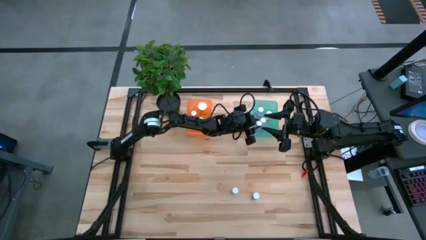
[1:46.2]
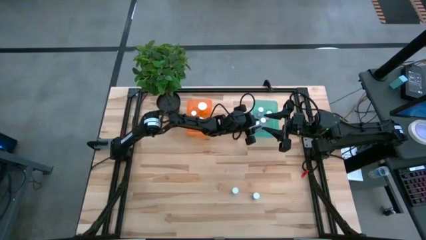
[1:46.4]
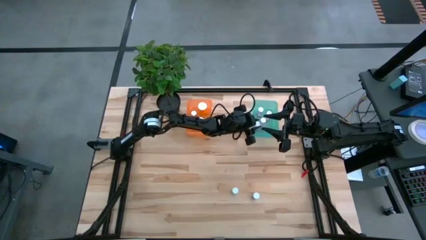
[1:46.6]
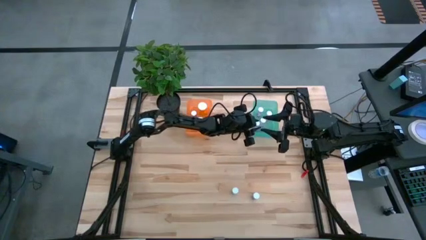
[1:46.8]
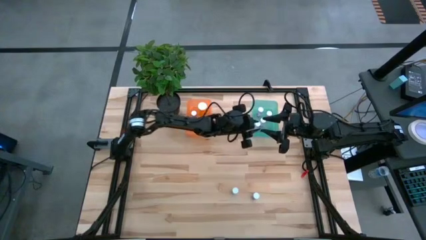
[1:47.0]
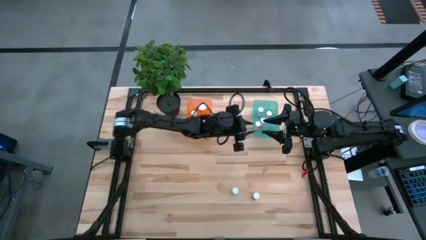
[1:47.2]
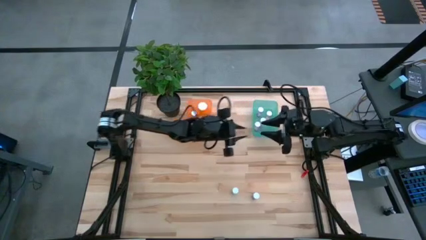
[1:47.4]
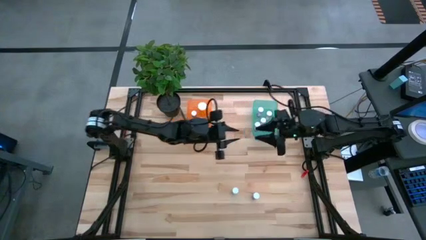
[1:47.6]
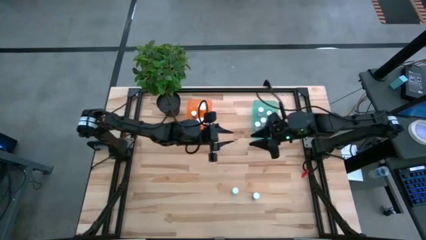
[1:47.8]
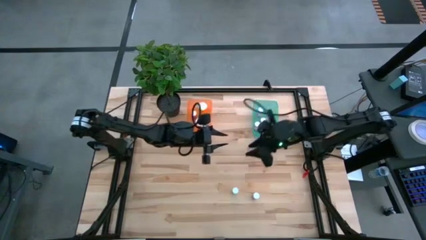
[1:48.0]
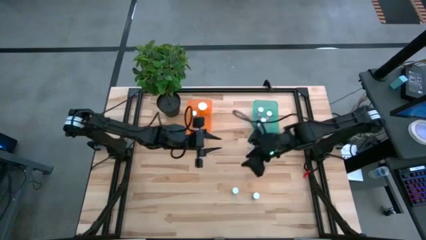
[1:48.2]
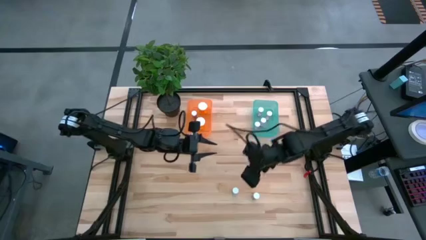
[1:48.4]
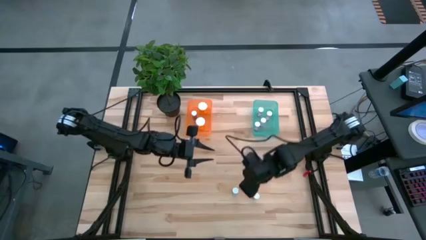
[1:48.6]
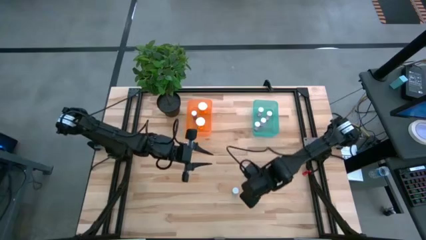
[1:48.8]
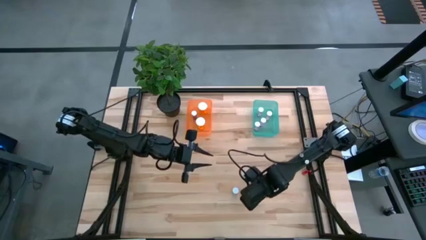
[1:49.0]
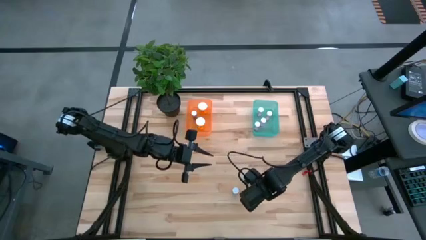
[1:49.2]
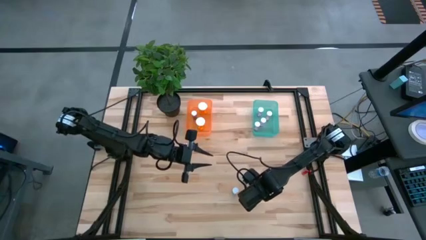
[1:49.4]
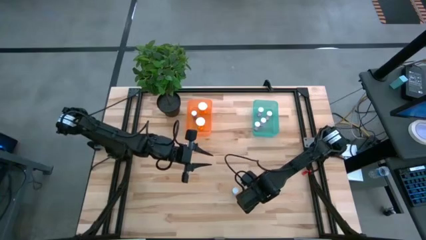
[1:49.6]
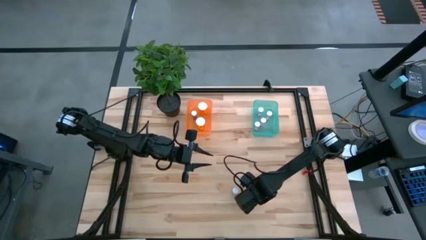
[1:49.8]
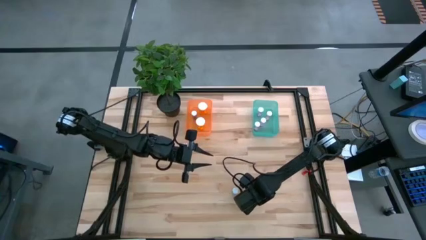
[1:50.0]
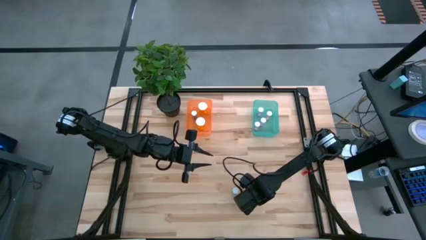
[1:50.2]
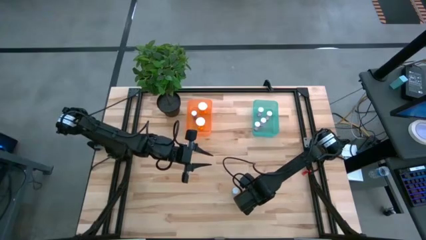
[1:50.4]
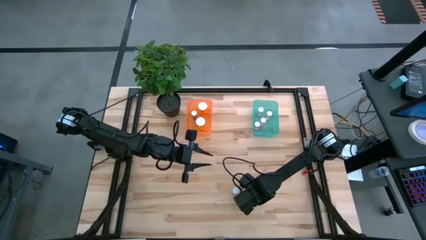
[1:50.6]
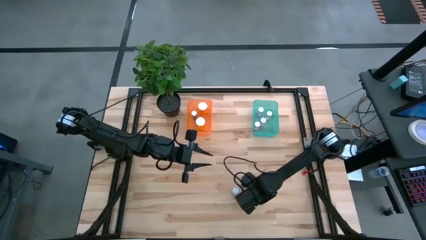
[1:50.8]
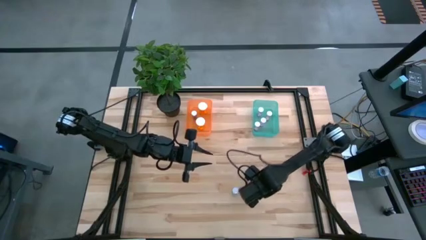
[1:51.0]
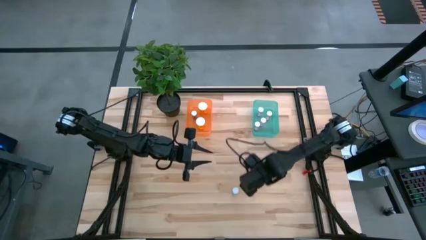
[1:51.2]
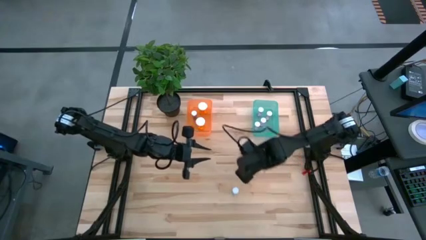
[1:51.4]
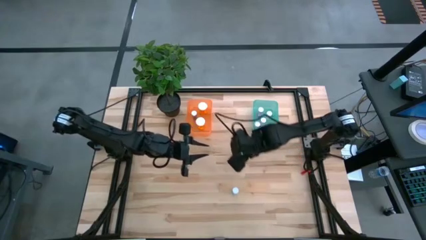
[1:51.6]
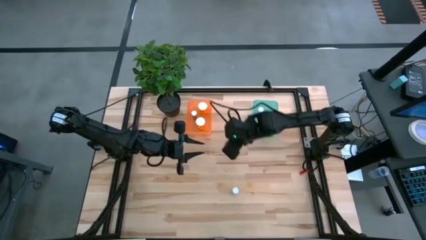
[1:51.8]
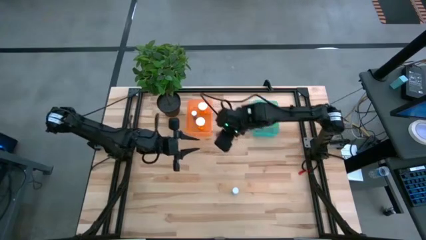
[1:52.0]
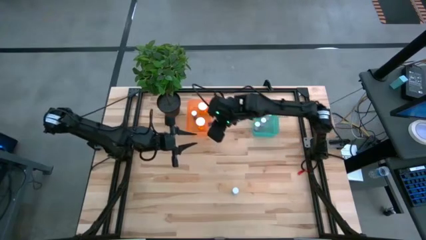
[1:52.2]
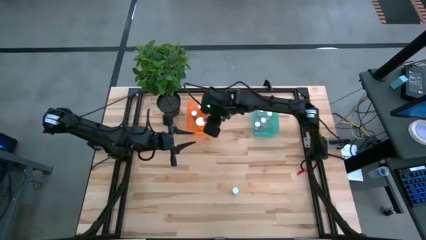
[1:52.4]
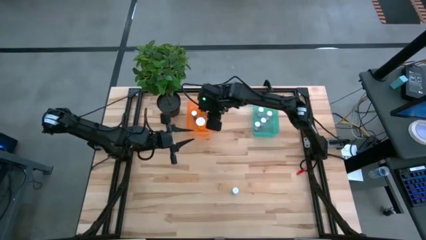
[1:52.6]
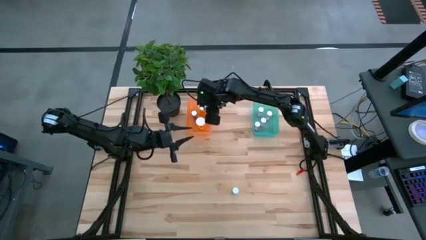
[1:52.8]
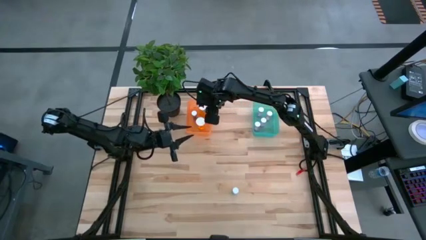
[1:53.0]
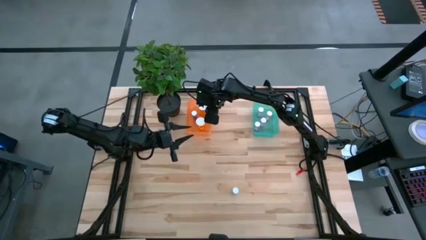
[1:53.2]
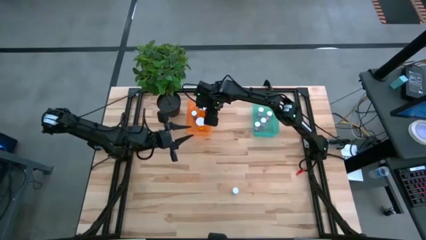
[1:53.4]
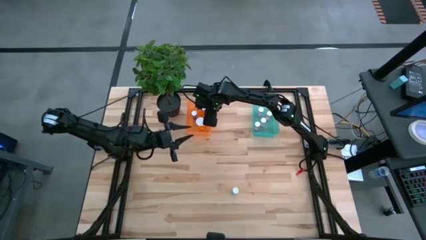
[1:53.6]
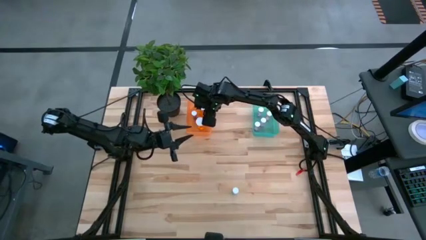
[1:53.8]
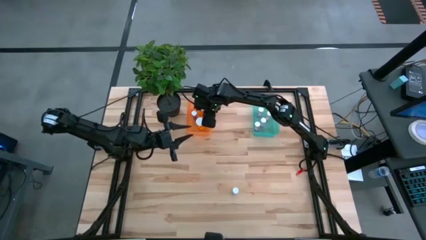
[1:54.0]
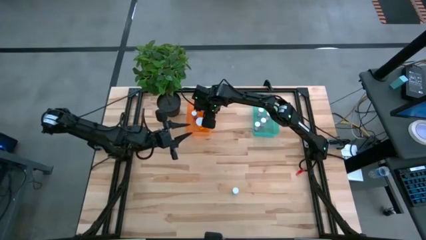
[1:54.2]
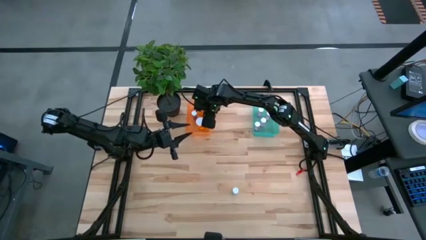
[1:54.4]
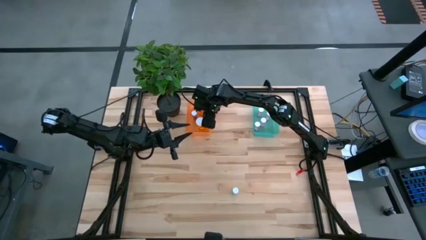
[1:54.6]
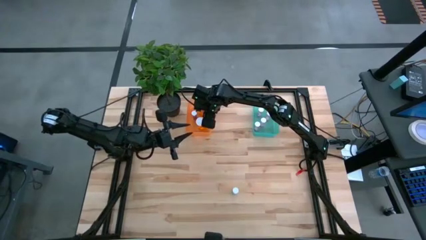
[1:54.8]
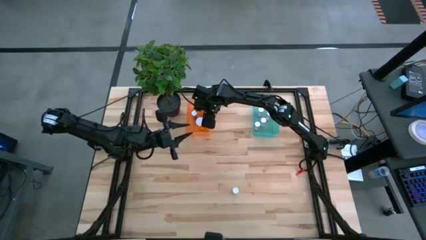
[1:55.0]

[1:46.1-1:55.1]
Task: Pick and place medicine bottles into bin by pill shape (circle, oval)
Put the right blue capsule bottle into the orange bin

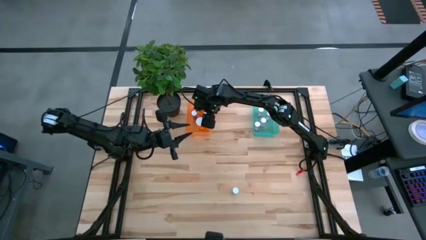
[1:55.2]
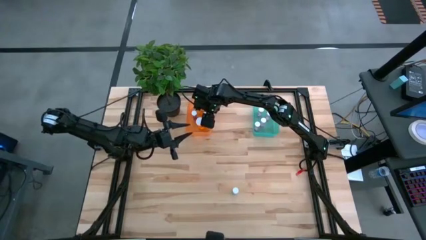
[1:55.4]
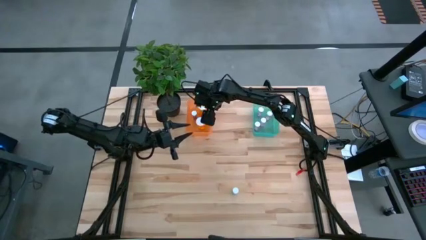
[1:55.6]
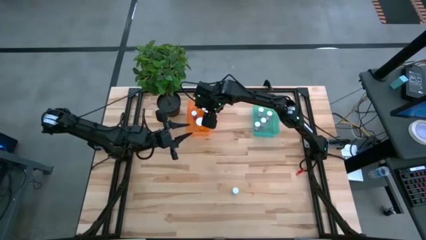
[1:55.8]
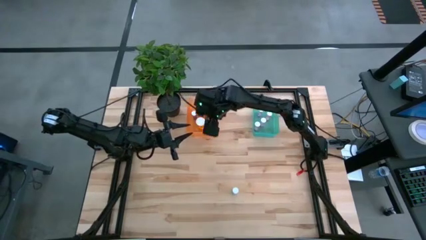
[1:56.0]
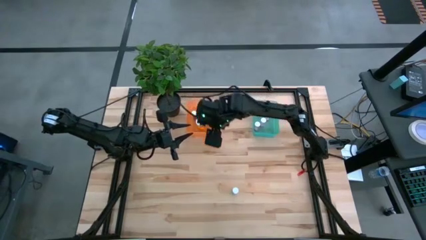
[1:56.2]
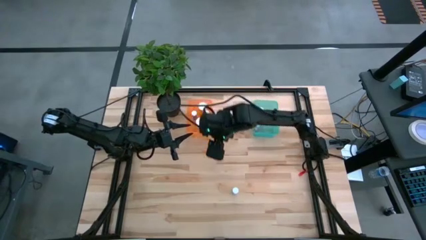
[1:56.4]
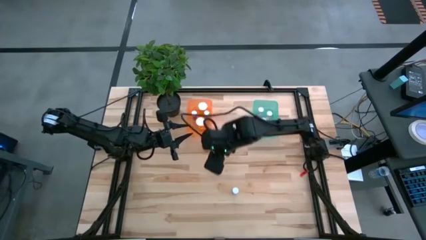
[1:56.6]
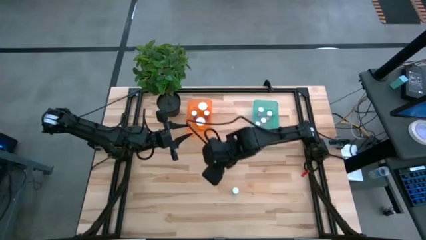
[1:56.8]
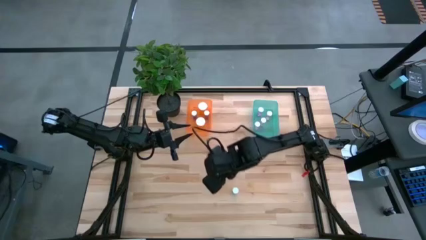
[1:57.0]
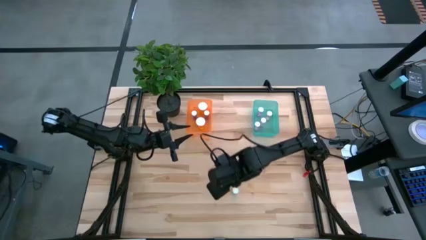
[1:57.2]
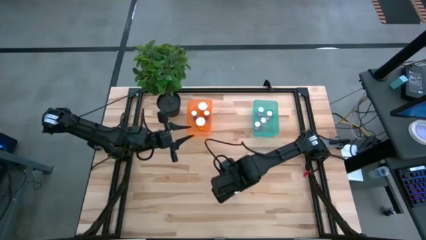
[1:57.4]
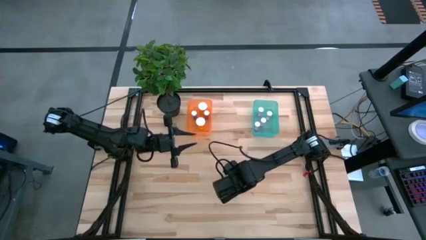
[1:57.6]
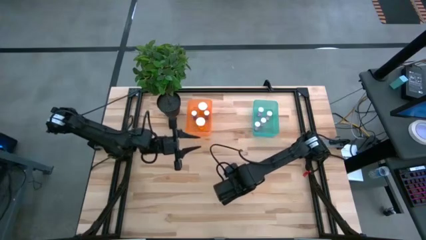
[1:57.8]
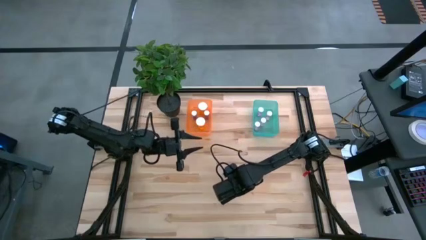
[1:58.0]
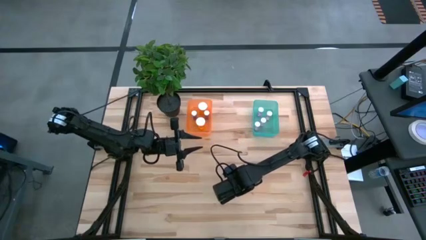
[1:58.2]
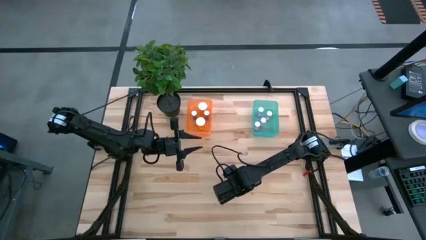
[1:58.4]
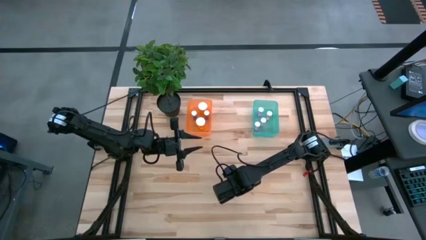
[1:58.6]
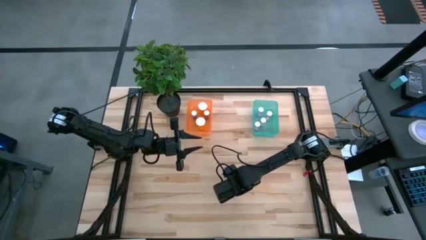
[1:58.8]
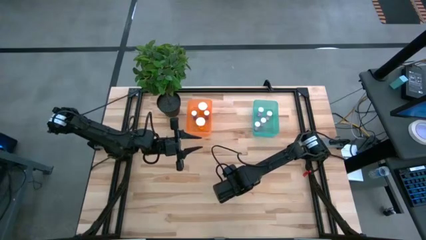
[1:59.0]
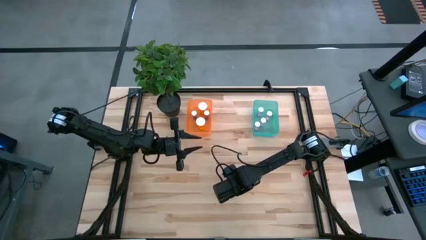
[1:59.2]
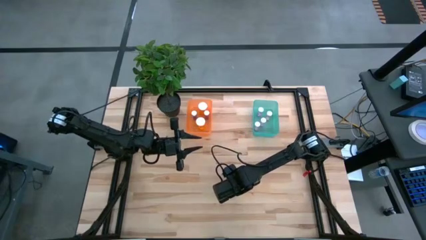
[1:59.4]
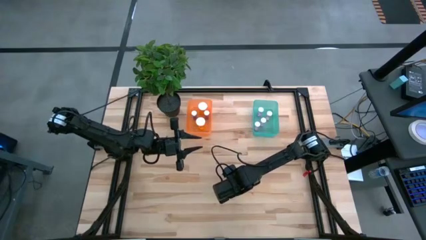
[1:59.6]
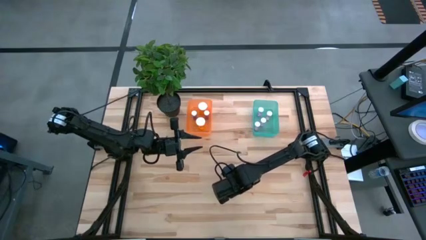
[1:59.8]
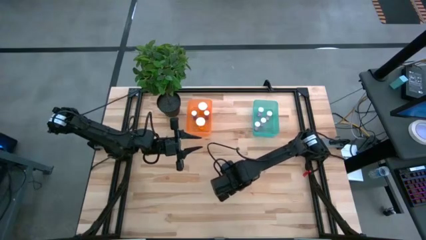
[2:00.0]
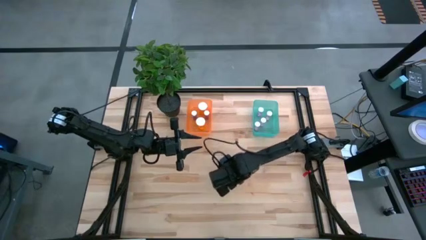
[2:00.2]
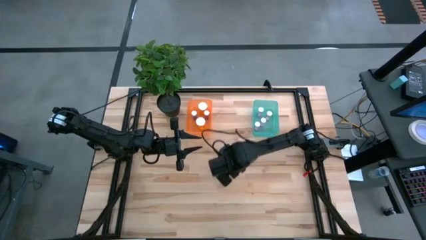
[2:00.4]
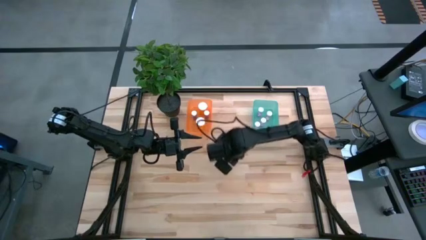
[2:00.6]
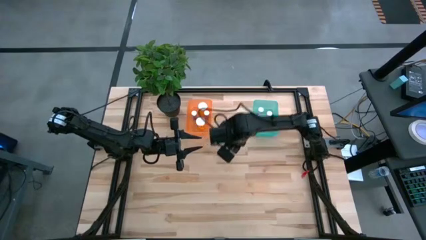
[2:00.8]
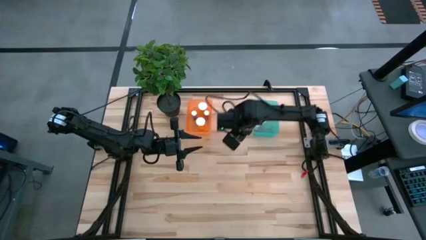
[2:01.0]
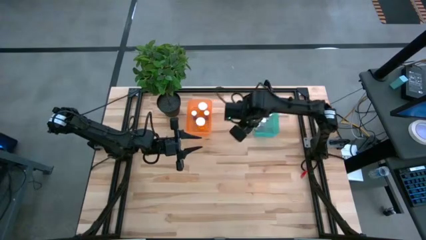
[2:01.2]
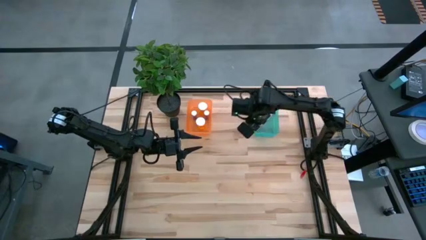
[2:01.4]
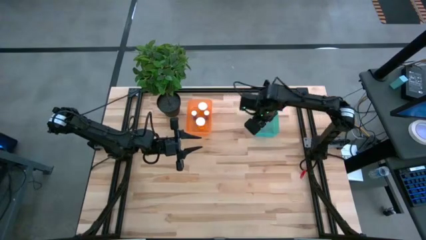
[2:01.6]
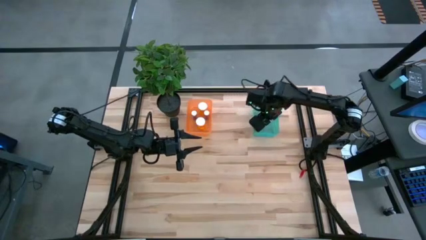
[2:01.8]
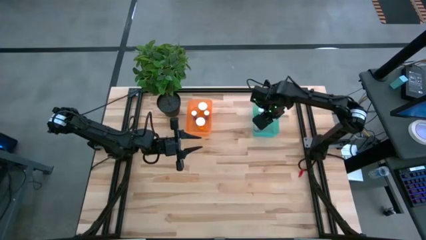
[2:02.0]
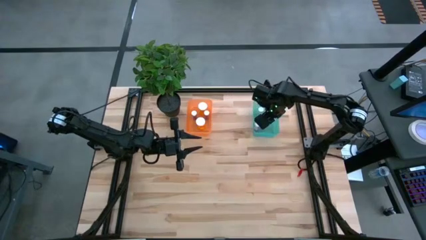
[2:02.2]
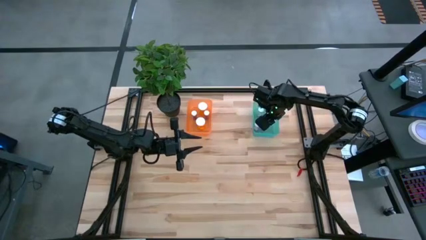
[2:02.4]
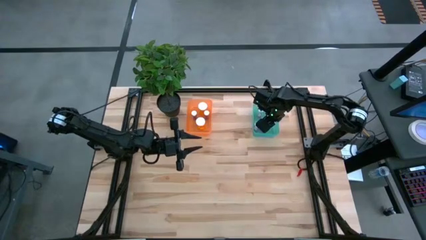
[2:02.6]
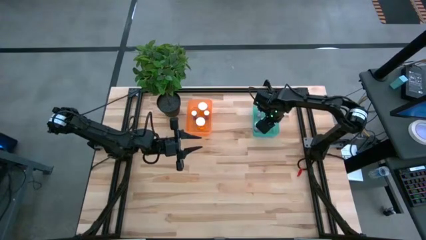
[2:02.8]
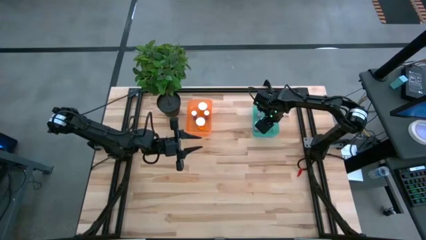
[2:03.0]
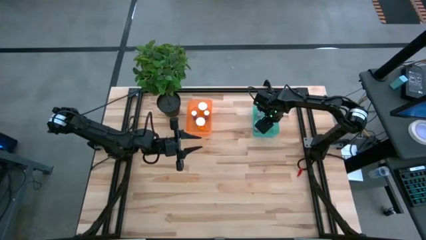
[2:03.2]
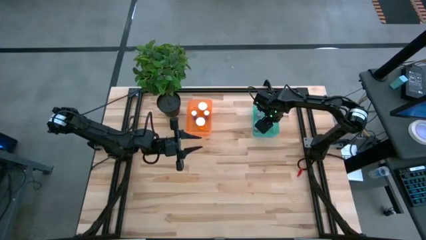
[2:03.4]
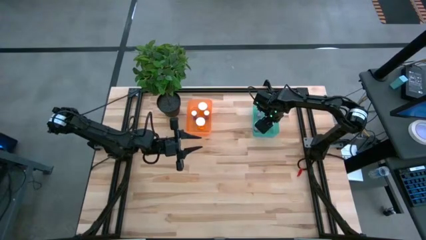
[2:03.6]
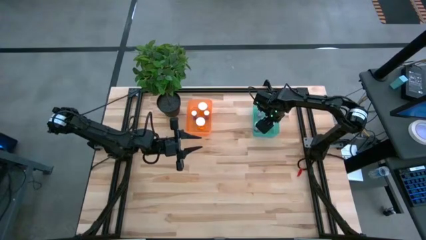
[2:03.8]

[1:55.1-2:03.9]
Put the blue tablet bottle into the blue bin
